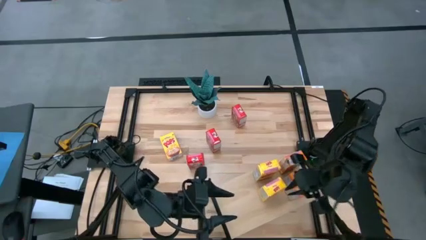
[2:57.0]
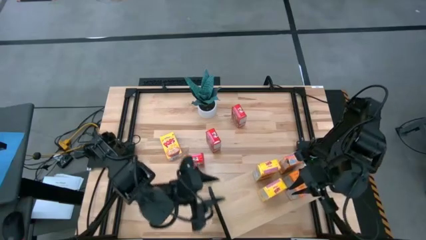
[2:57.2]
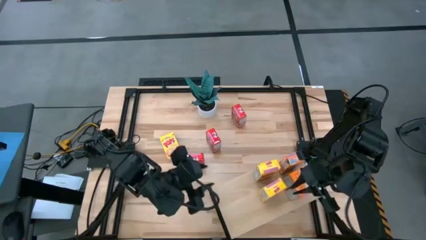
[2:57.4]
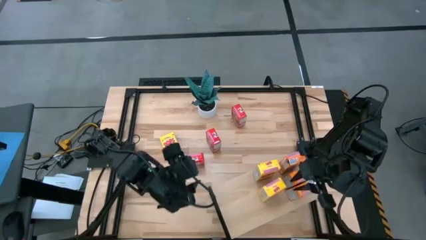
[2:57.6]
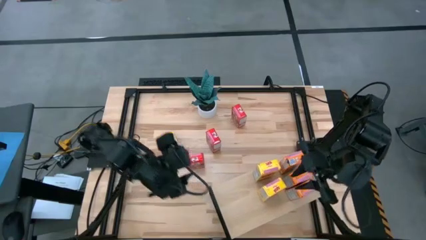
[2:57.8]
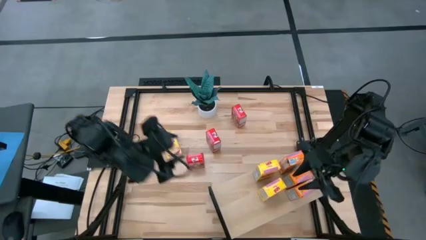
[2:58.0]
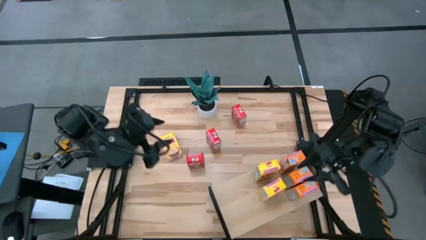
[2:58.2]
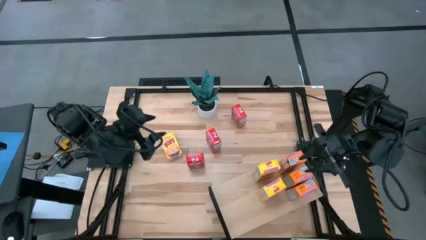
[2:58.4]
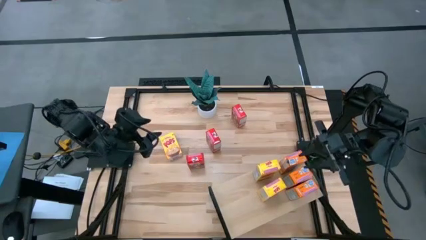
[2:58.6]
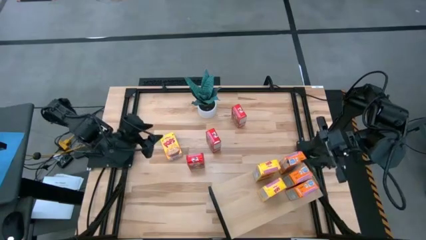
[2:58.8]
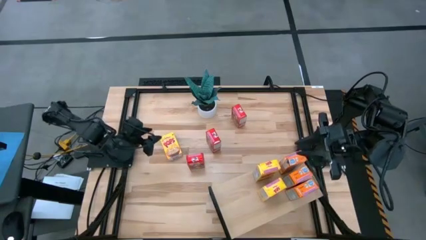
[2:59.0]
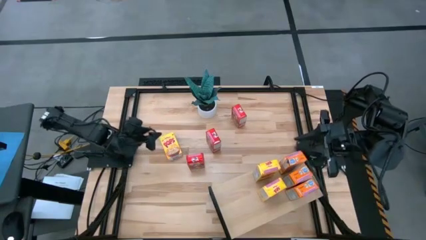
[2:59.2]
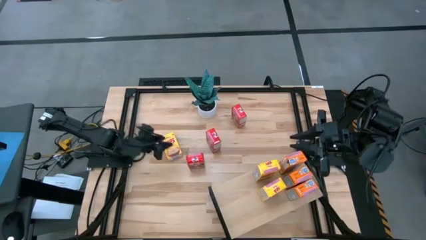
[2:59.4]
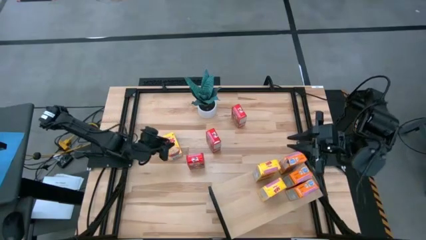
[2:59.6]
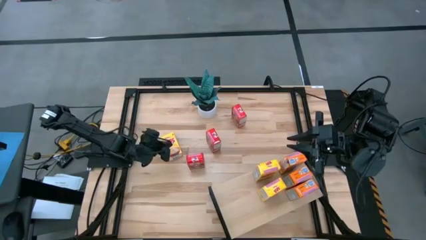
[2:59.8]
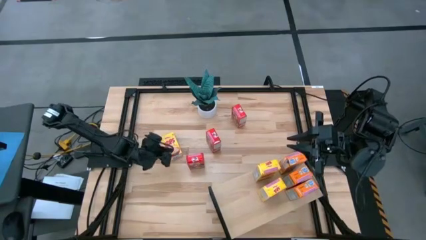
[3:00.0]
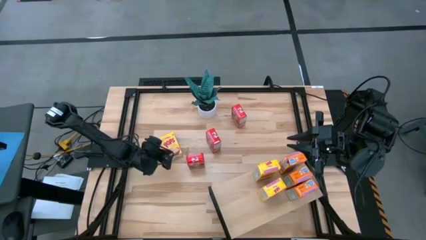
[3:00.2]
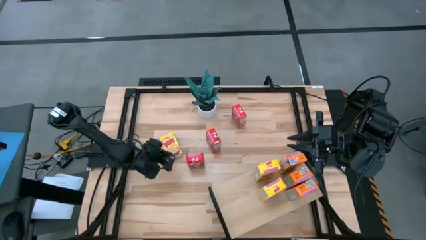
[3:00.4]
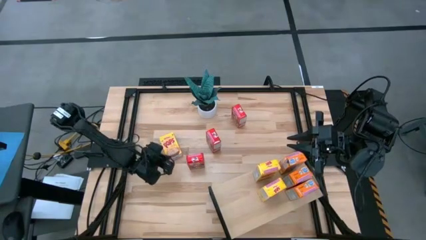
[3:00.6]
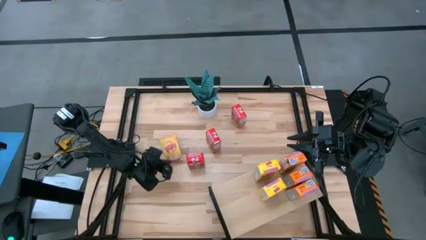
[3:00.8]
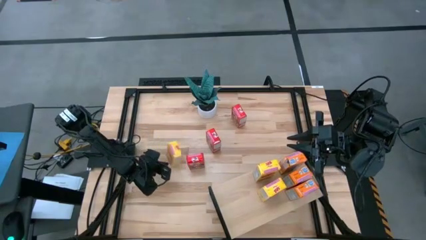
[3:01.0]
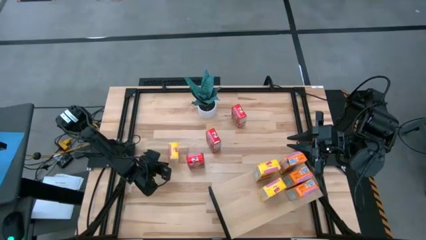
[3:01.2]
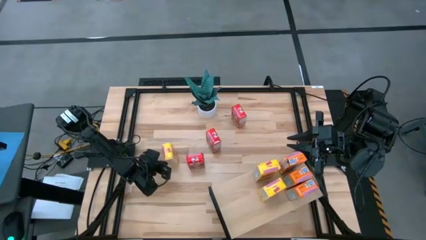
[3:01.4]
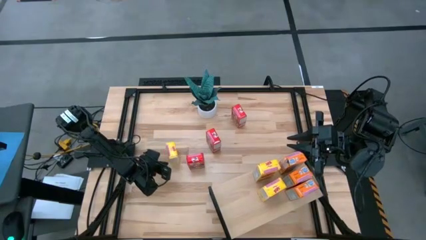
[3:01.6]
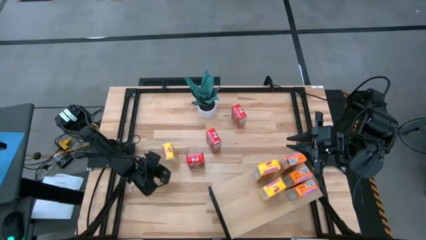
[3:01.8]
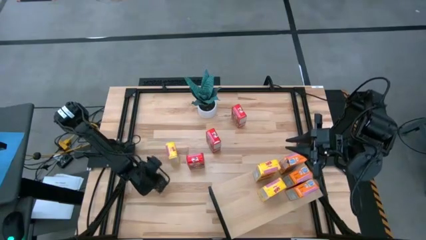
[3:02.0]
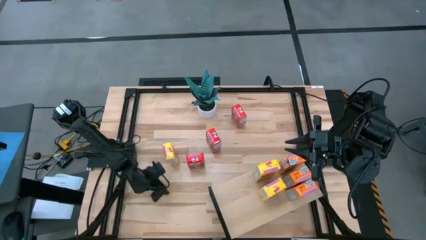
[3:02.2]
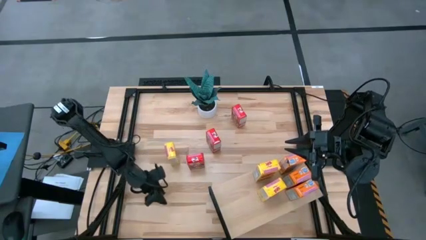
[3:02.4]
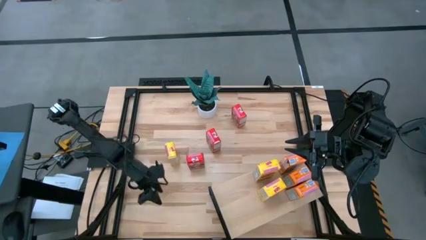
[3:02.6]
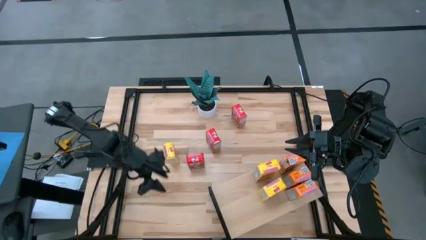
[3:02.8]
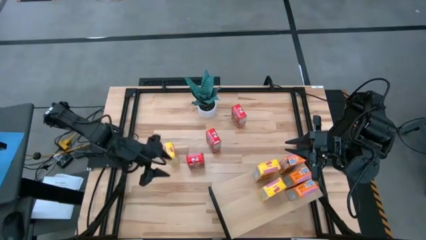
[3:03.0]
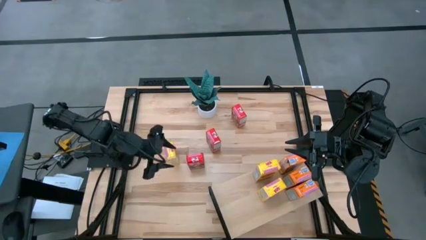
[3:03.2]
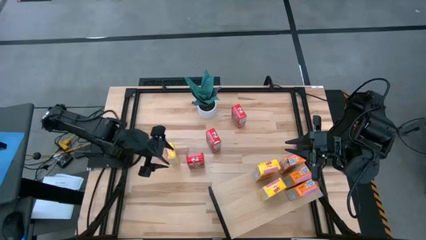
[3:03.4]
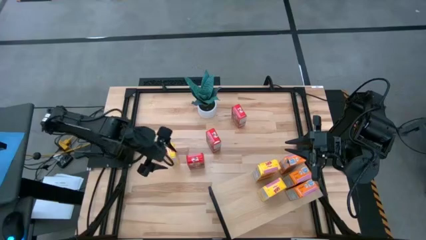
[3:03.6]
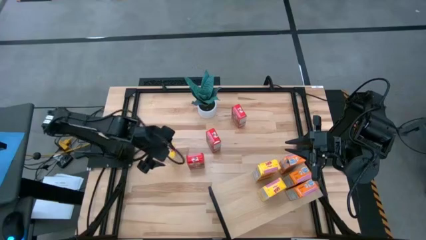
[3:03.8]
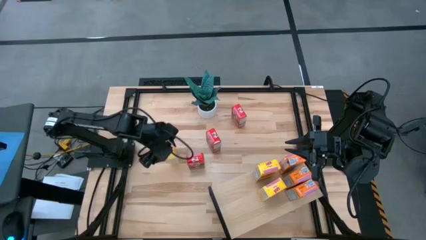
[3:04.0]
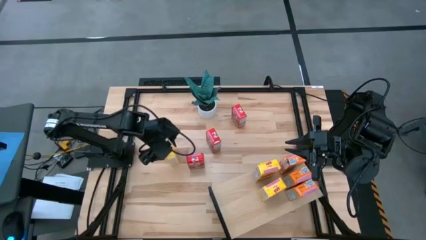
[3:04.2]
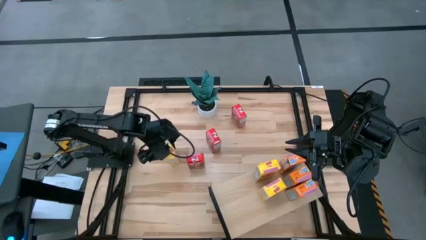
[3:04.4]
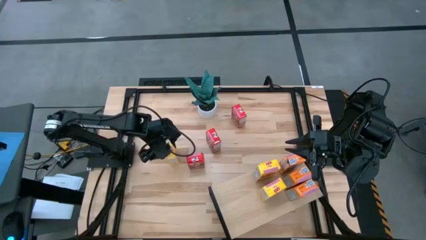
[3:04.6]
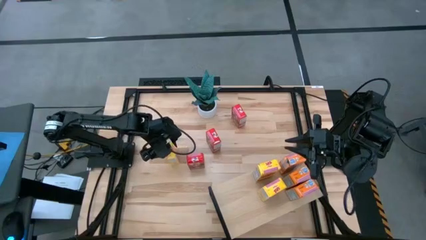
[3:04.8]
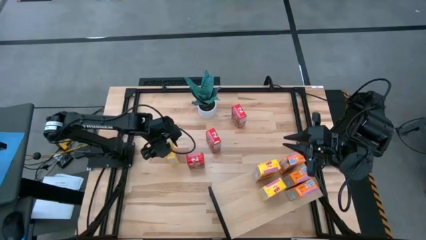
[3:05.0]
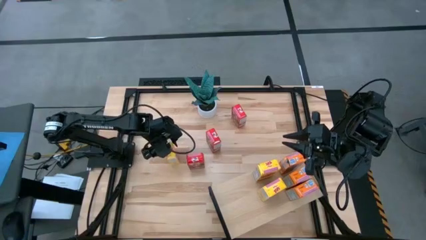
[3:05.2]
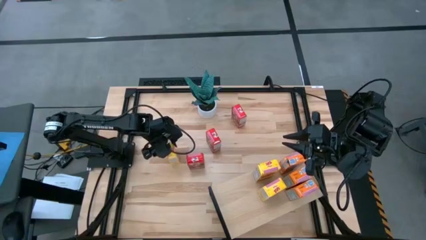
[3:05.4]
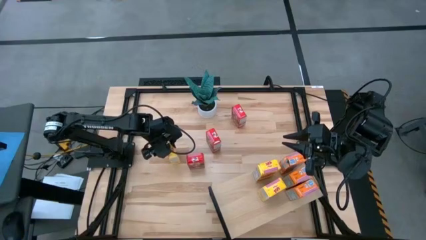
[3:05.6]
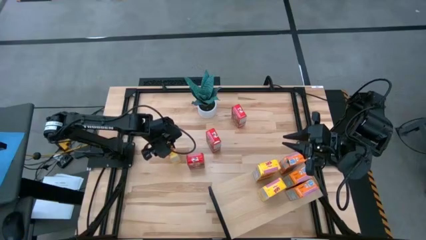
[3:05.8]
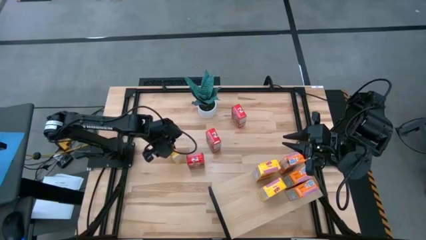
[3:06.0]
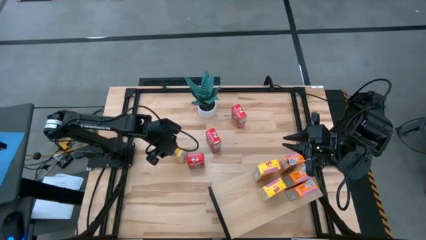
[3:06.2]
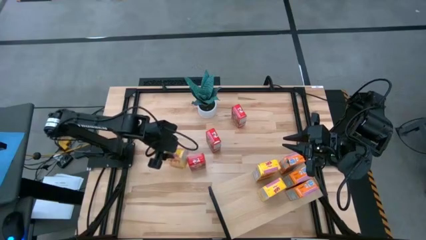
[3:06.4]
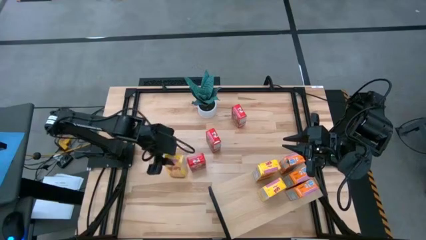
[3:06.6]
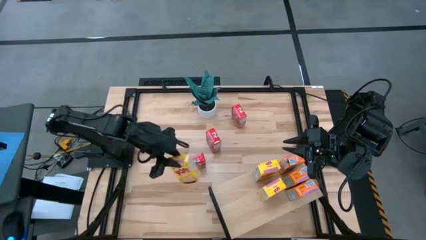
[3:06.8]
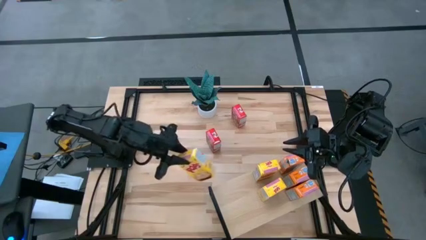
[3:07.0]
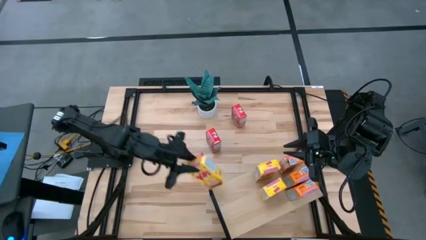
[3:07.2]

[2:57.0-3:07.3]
Task: Stack cereal on shelf
Put the yellow cereal box on the shelf aligned with the other yellow cereal boxes
